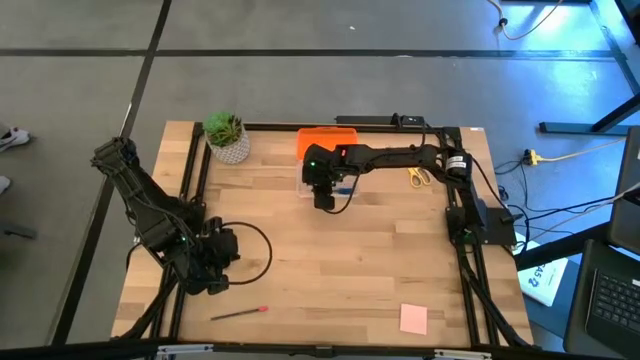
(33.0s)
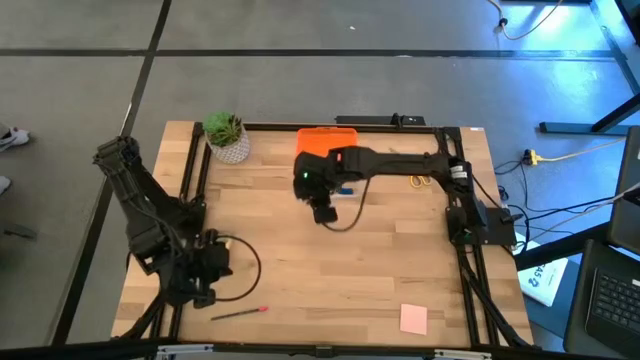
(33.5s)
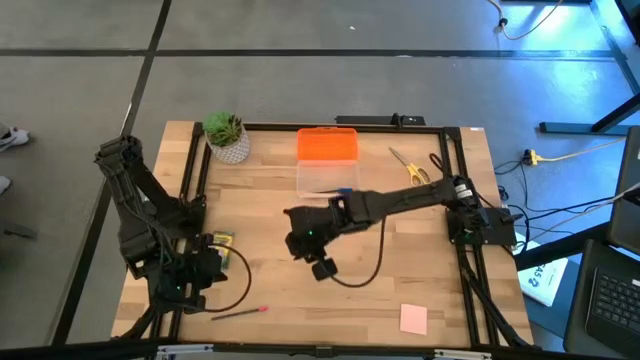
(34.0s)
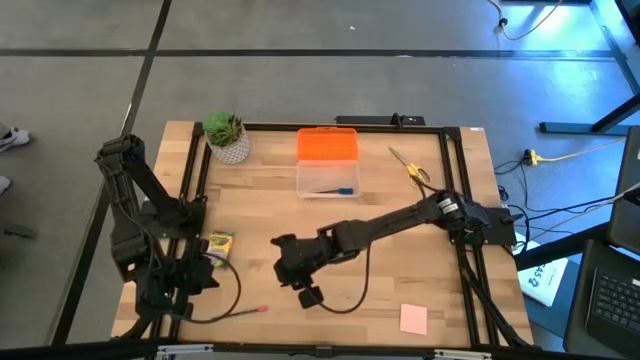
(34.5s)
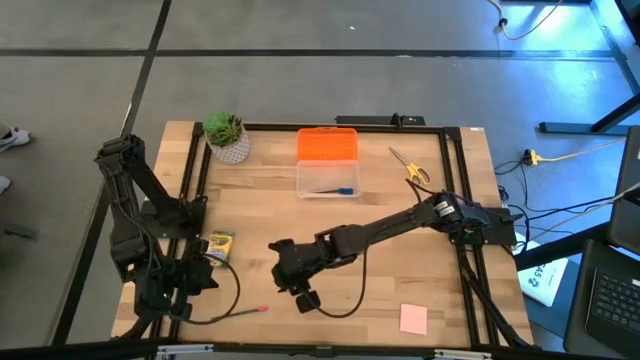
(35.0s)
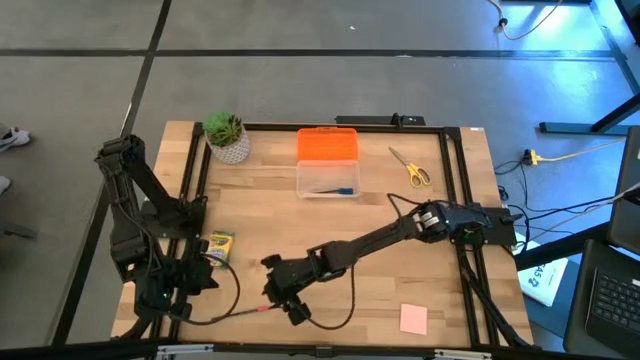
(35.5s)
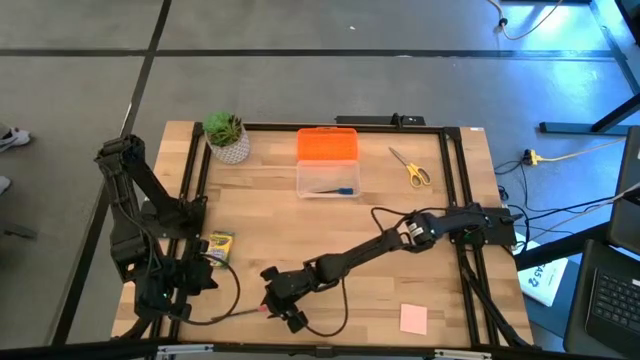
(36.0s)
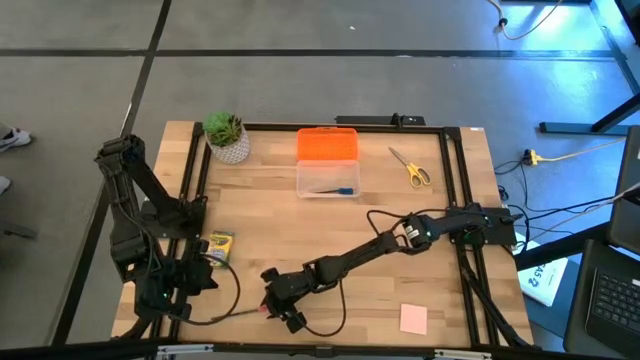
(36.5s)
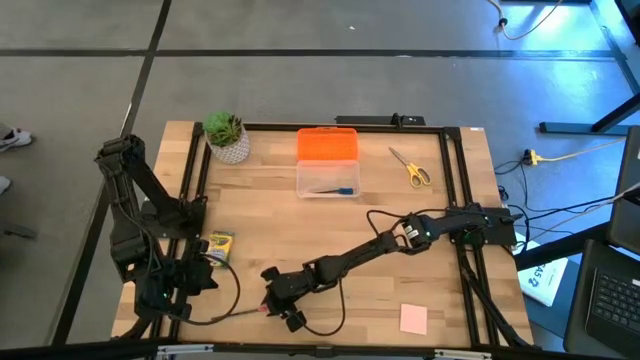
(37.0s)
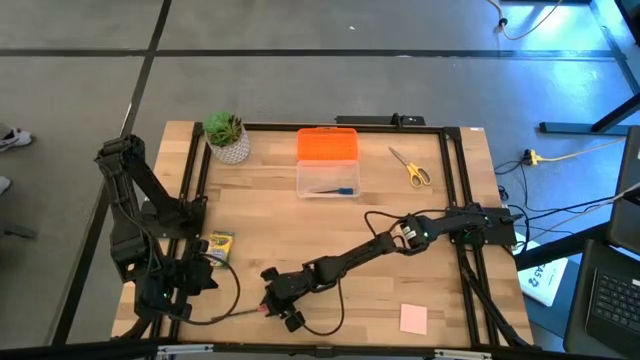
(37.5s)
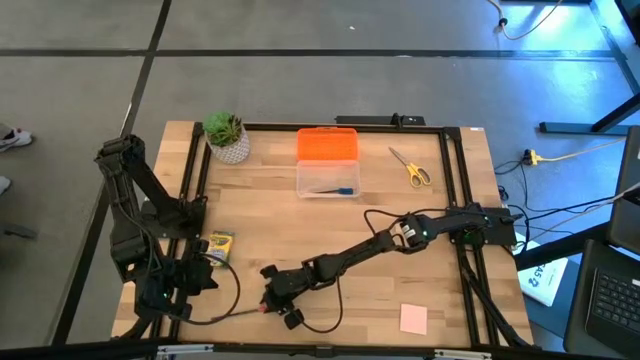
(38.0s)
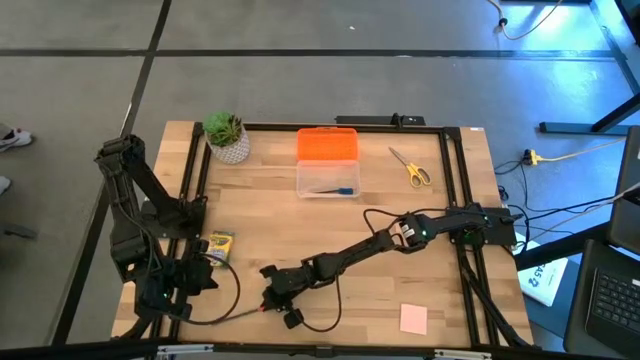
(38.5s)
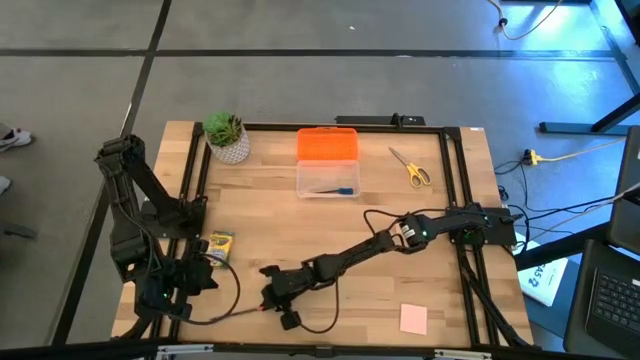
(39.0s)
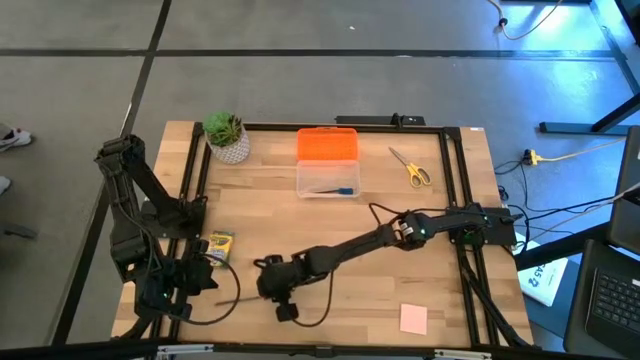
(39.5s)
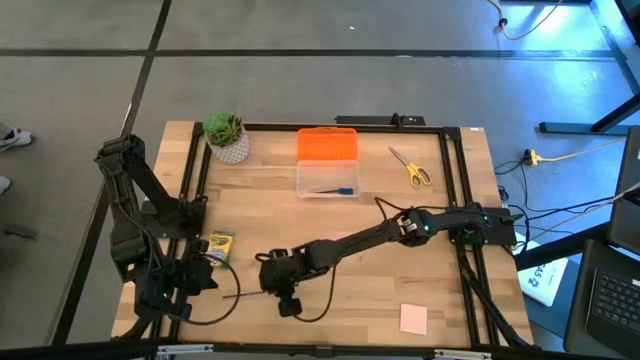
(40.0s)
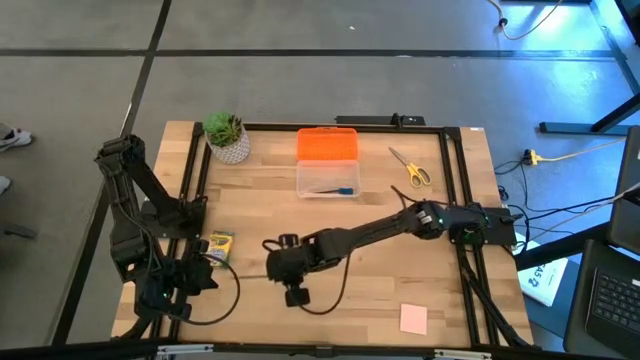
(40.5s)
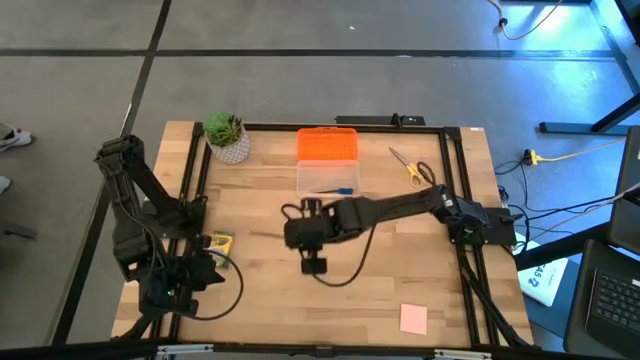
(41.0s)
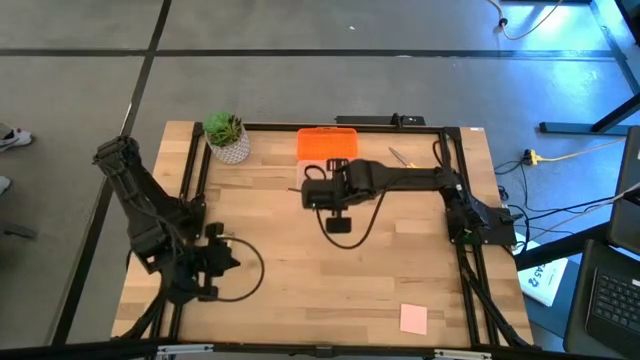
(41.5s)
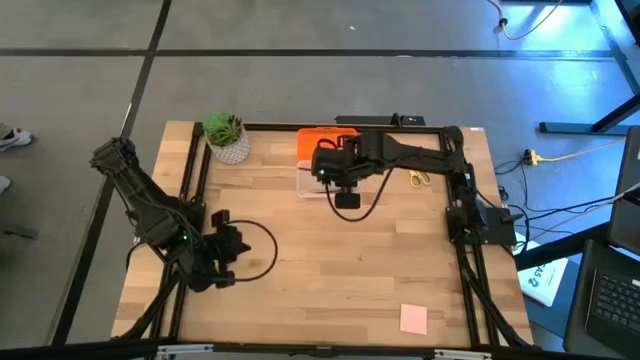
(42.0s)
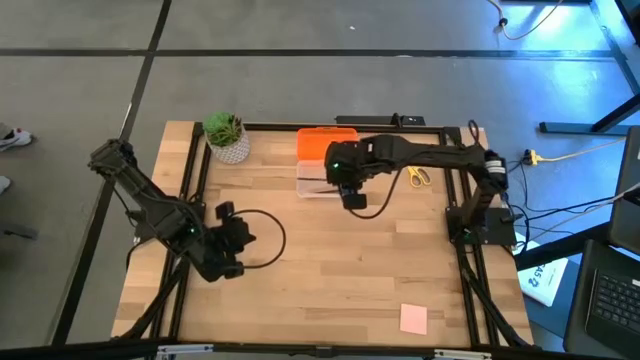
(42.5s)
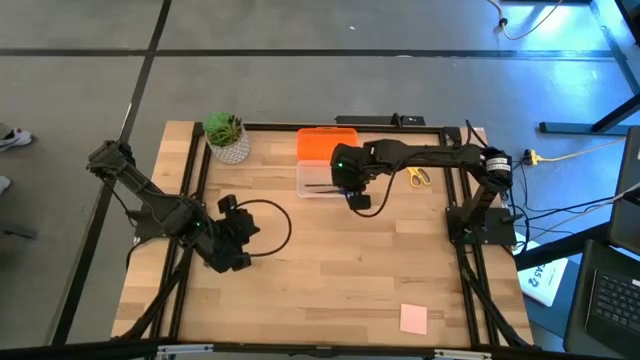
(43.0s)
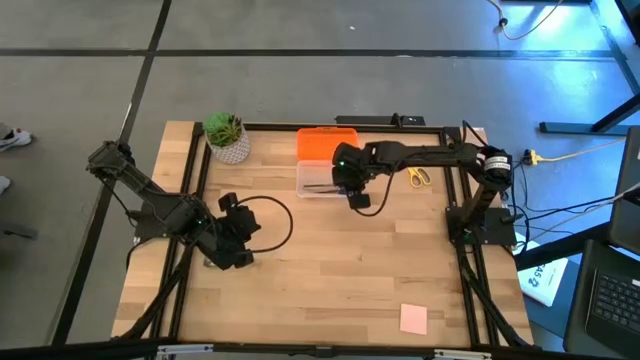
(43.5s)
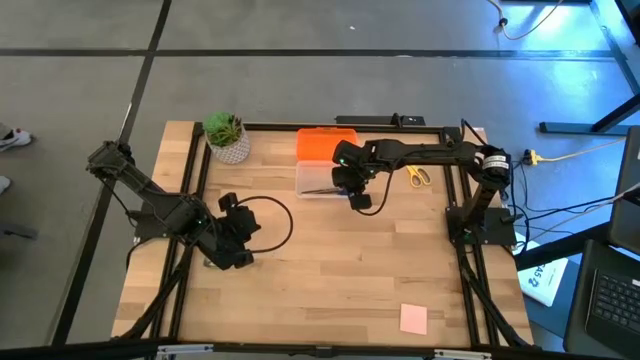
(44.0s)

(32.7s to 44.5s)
Task: Pack school essentials
Put the black pencil into the orange supply box

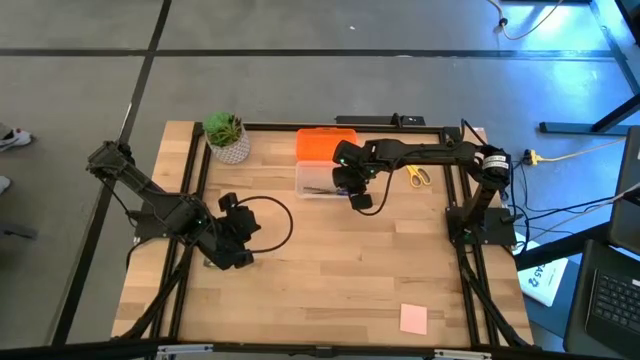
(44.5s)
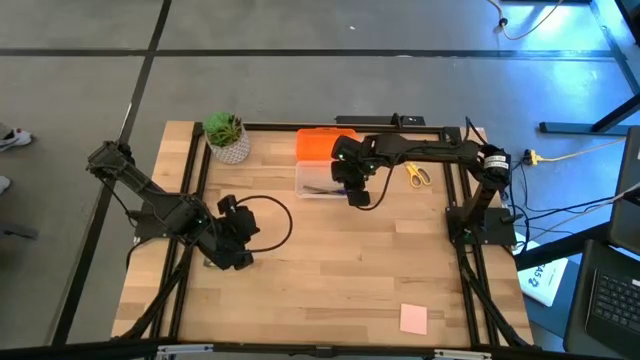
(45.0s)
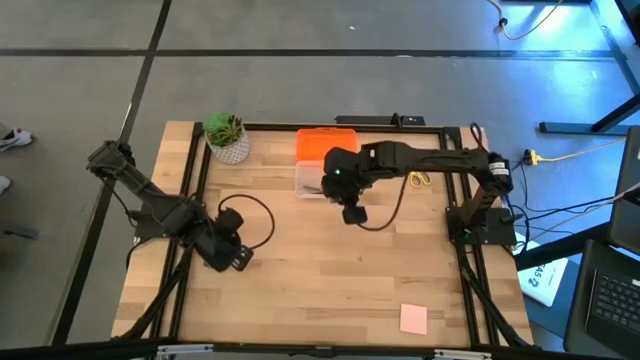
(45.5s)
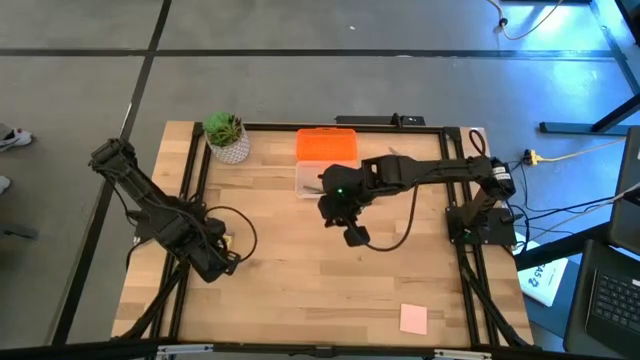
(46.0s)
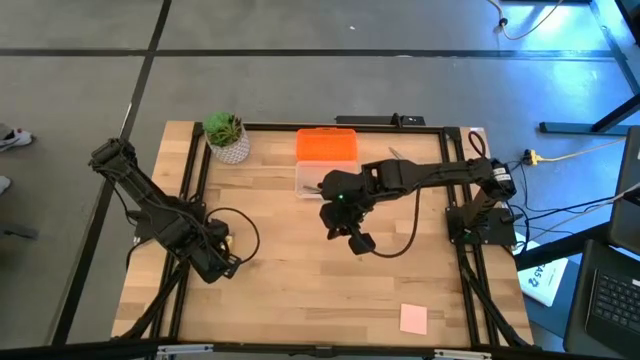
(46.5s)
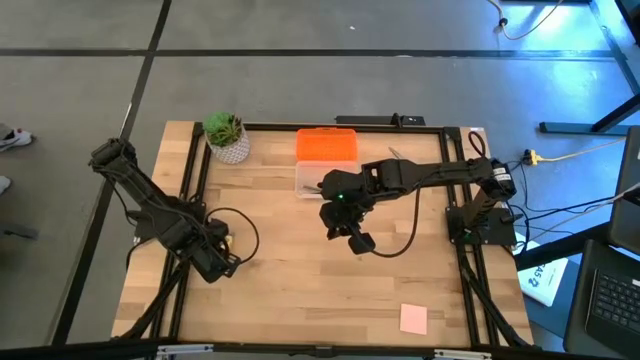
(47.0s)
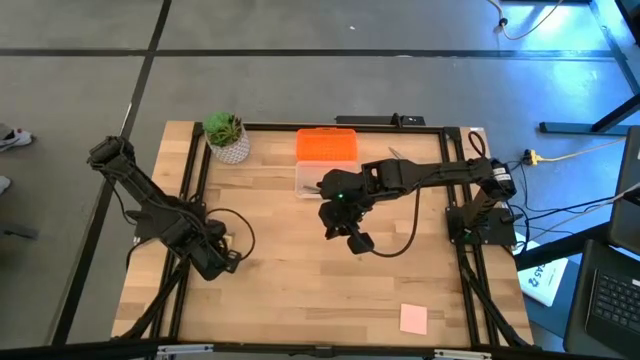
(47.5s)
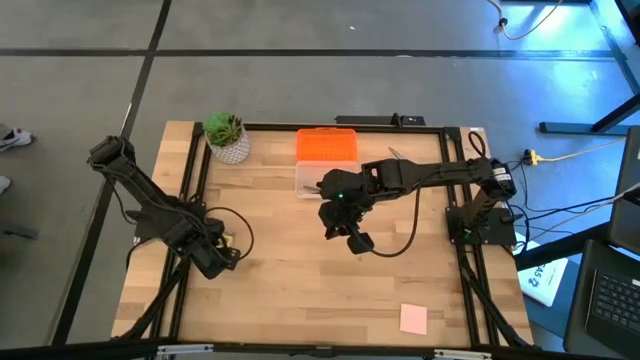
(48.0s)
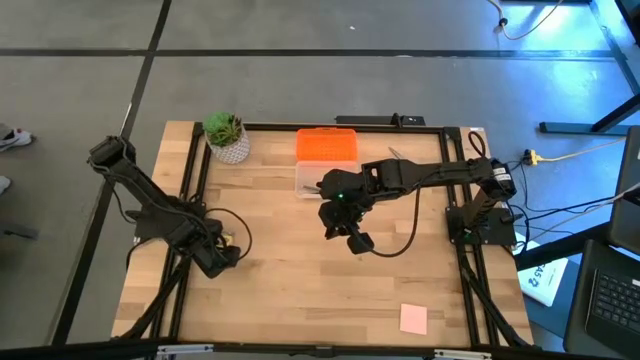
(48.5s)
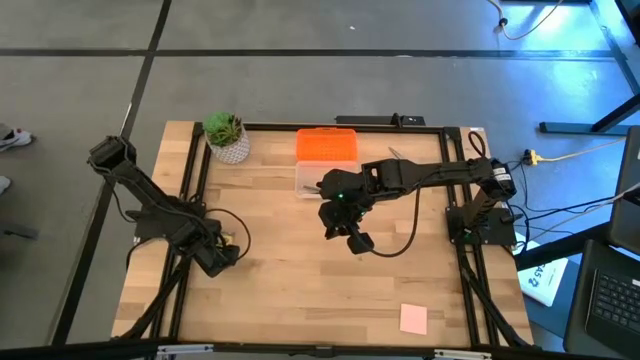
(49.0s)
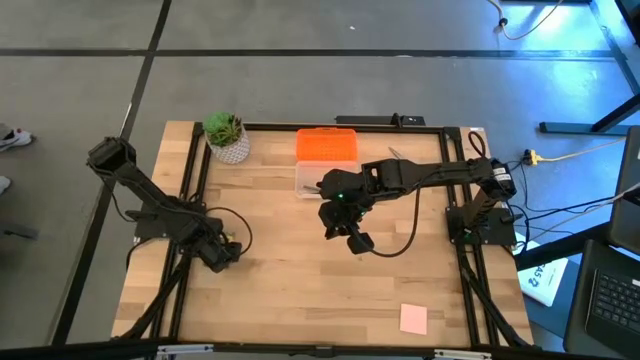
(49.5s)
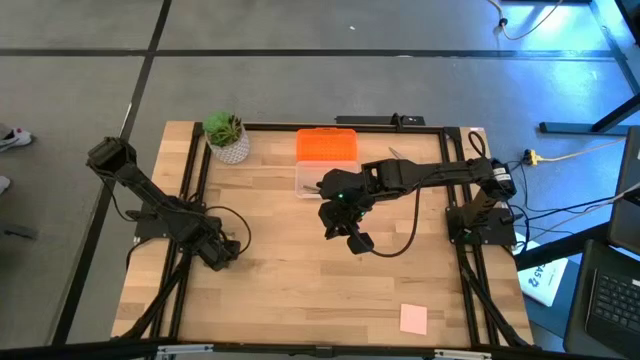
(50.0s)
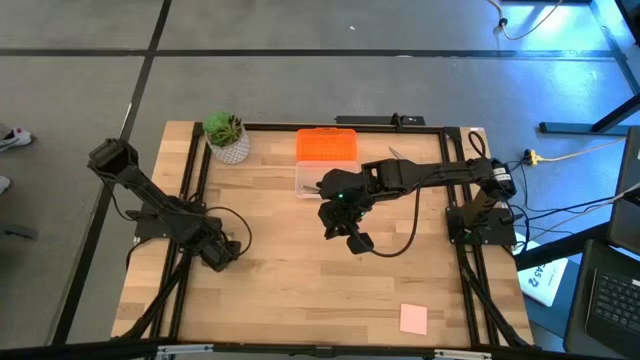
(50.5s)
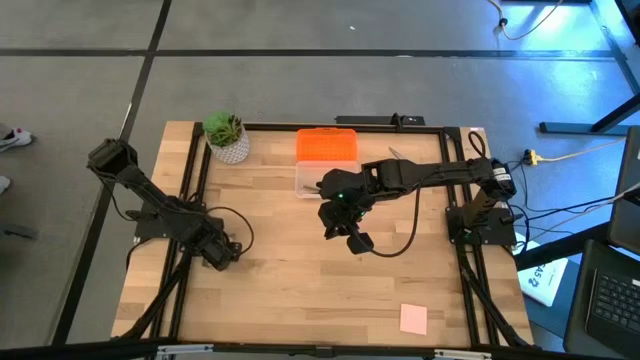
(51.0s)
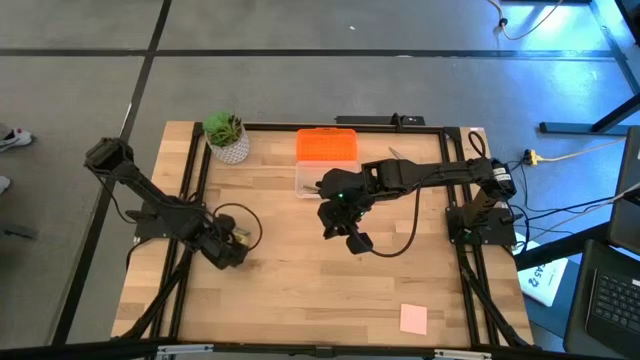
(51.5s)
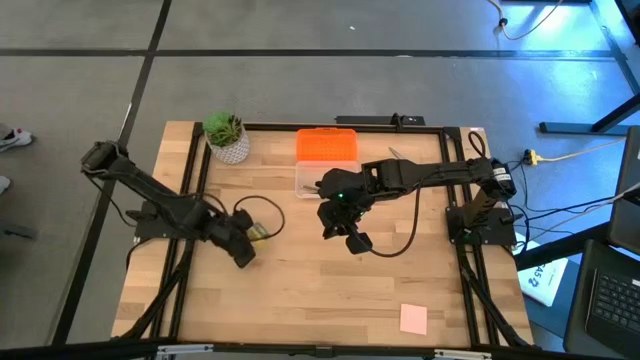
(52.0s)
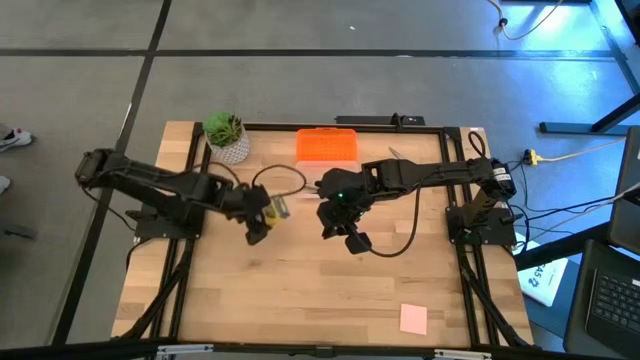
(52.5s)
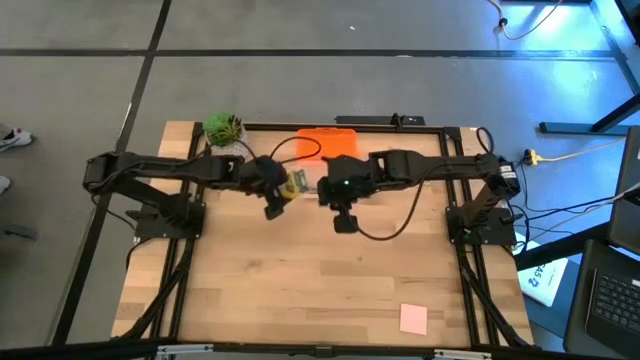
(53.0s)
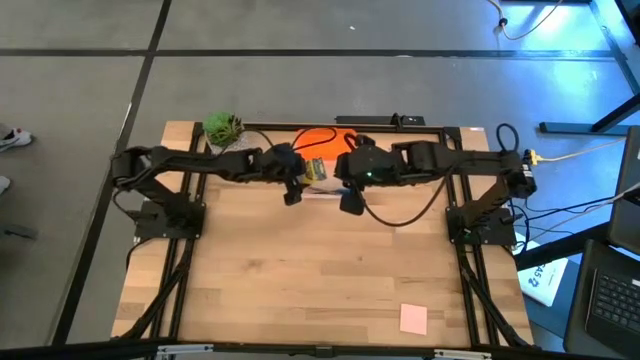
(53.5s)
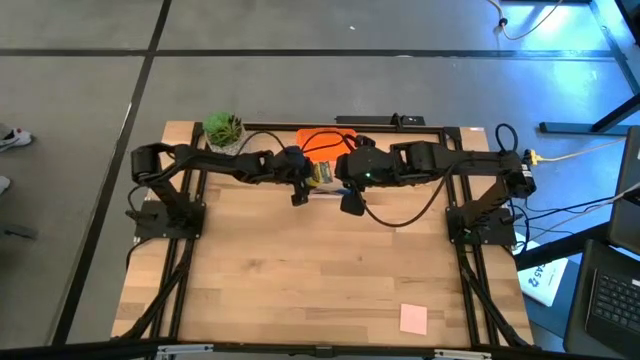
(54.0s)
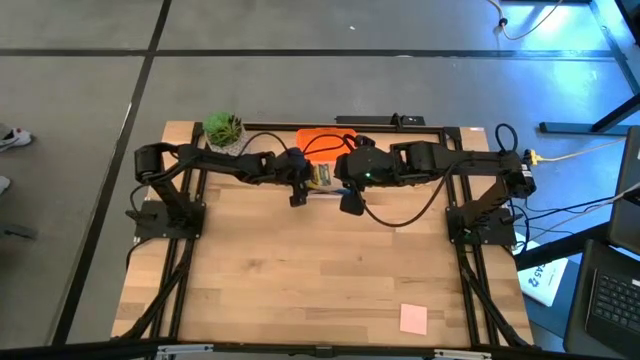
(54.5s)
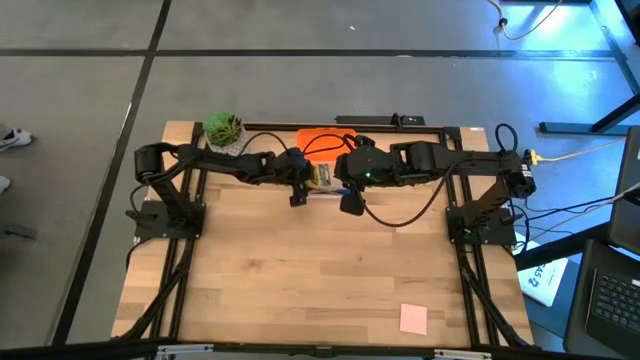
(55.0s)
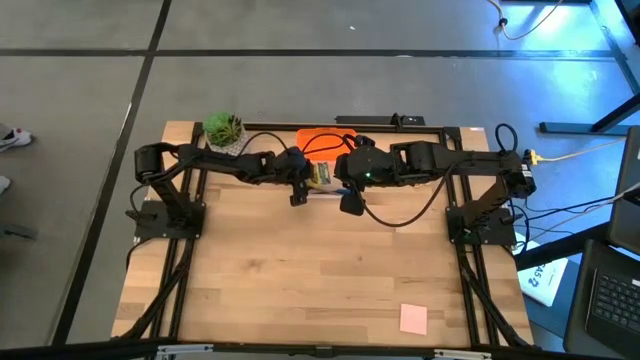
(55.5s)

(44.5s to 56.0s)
Put the yellow crayon box into the orange supply box
